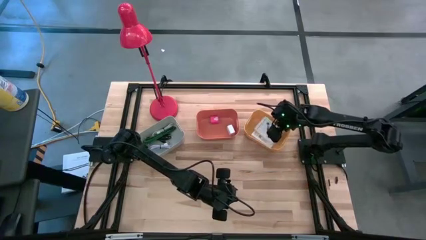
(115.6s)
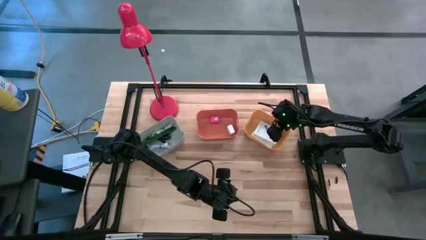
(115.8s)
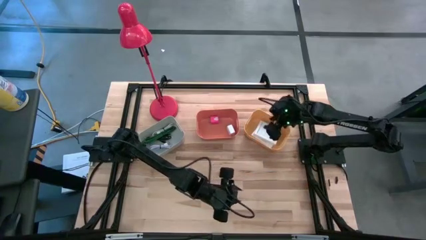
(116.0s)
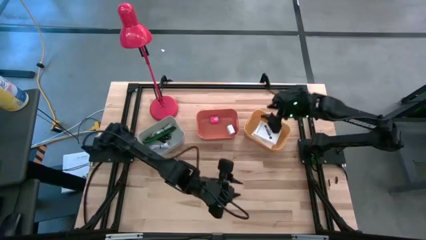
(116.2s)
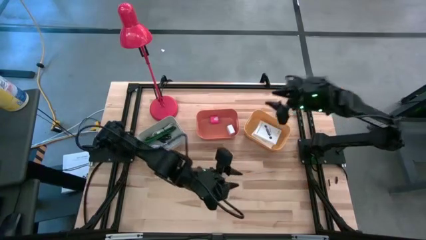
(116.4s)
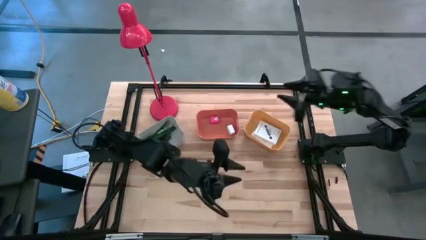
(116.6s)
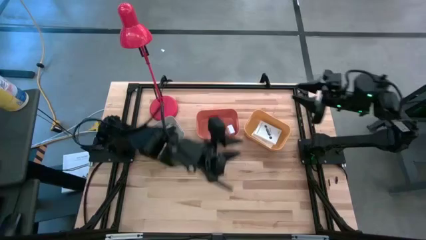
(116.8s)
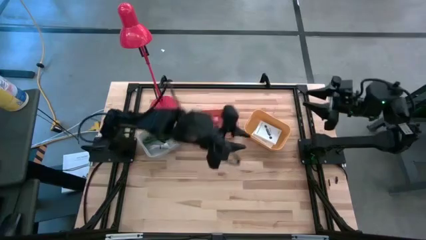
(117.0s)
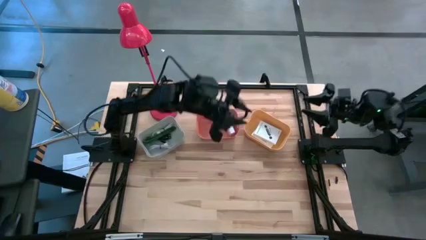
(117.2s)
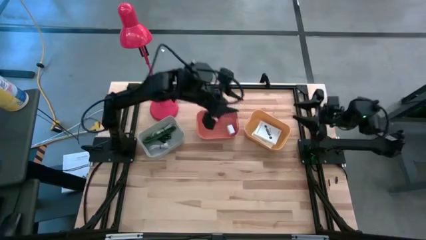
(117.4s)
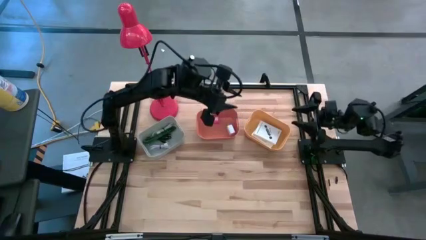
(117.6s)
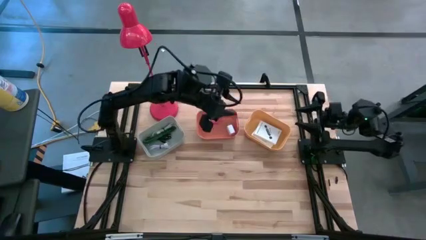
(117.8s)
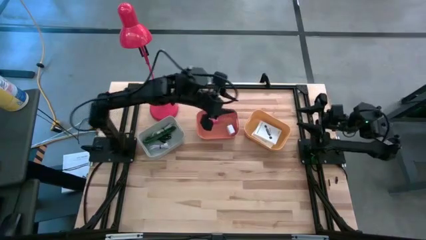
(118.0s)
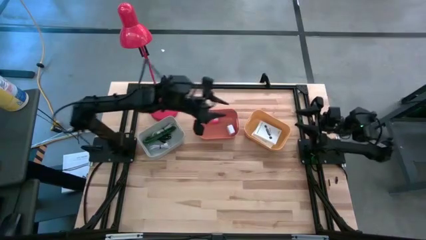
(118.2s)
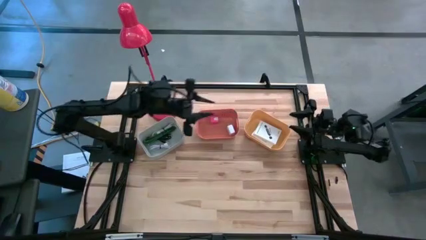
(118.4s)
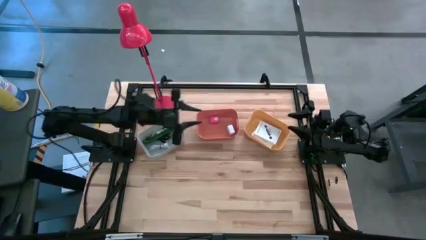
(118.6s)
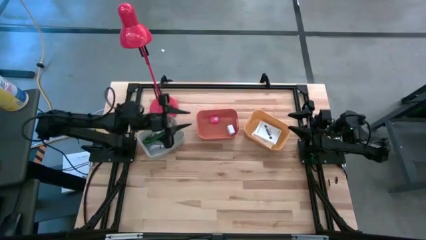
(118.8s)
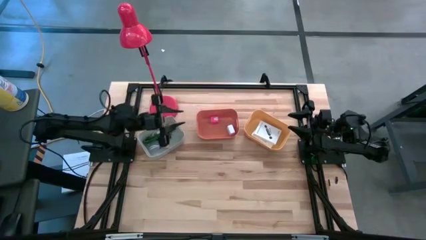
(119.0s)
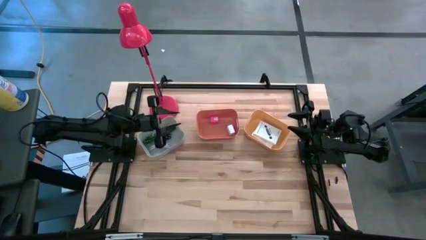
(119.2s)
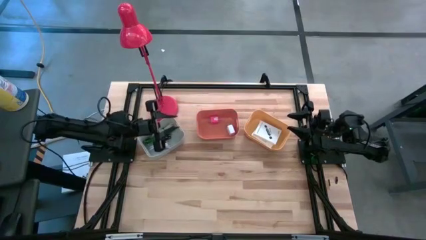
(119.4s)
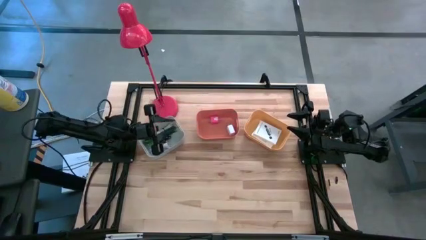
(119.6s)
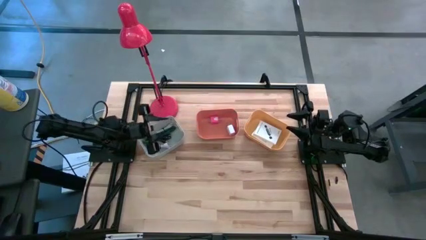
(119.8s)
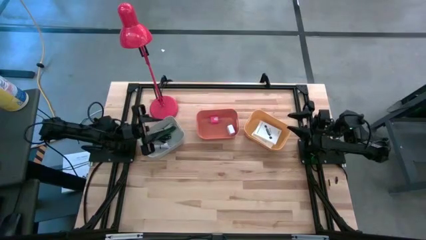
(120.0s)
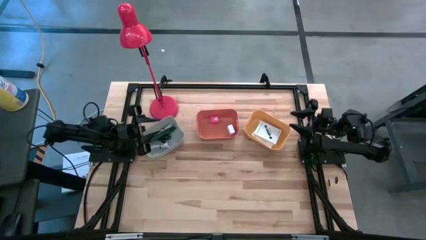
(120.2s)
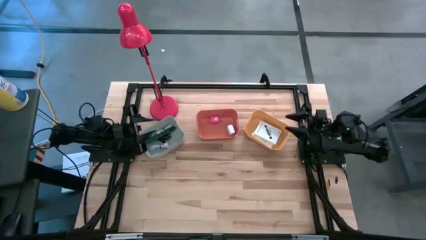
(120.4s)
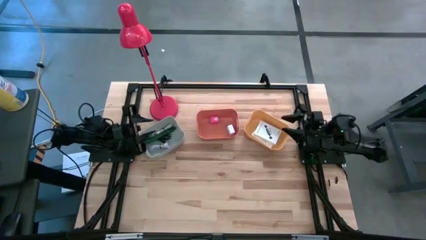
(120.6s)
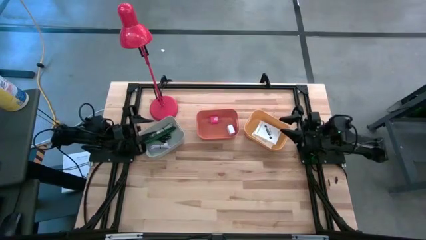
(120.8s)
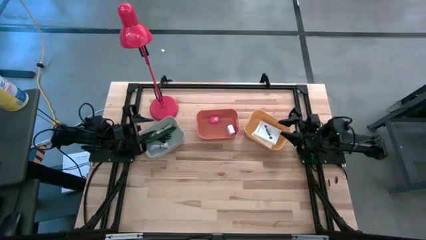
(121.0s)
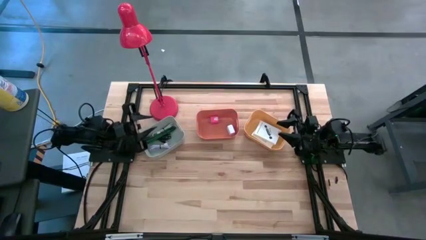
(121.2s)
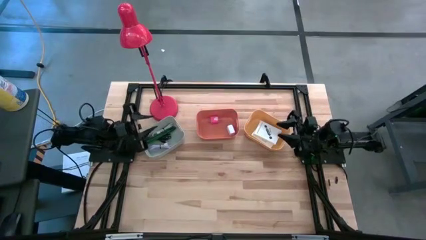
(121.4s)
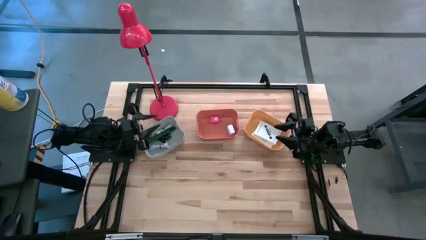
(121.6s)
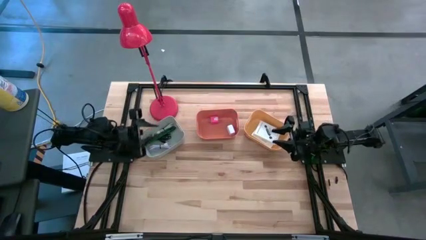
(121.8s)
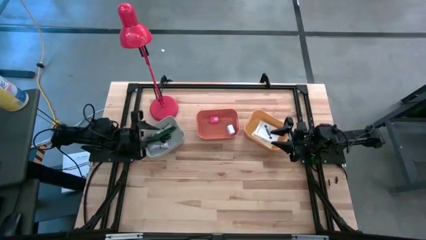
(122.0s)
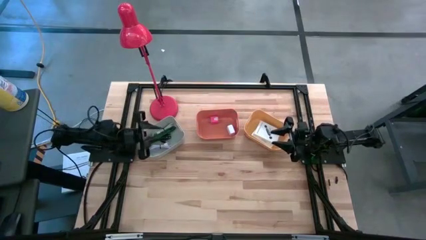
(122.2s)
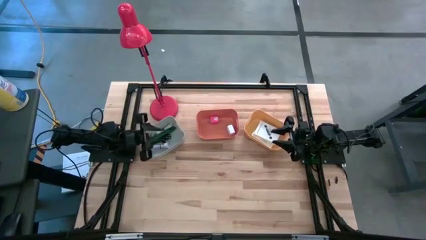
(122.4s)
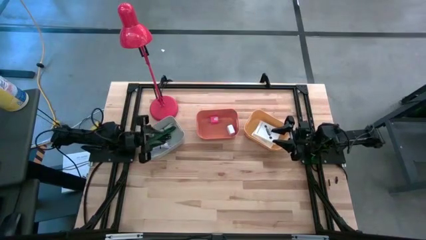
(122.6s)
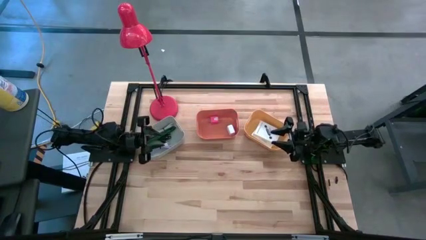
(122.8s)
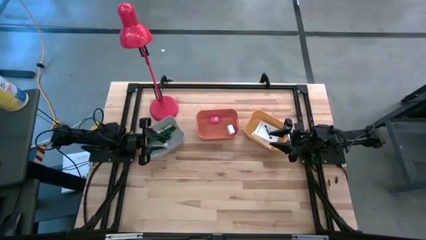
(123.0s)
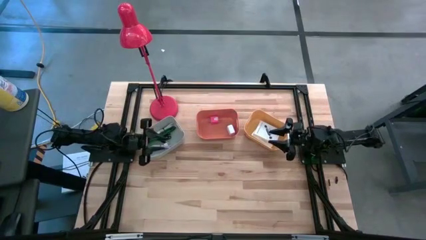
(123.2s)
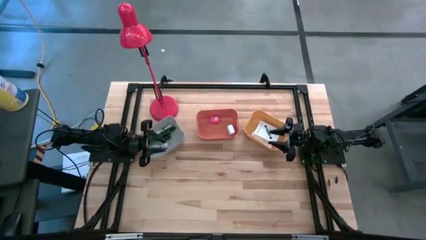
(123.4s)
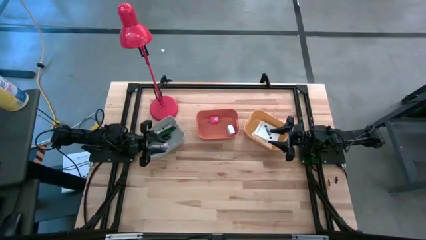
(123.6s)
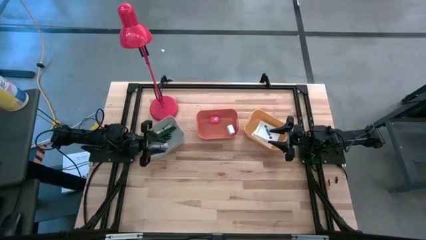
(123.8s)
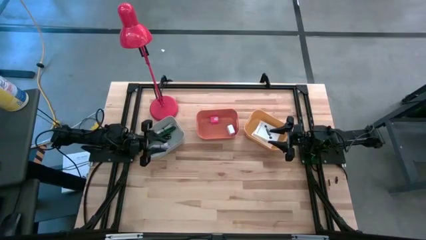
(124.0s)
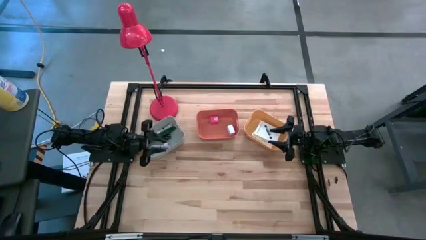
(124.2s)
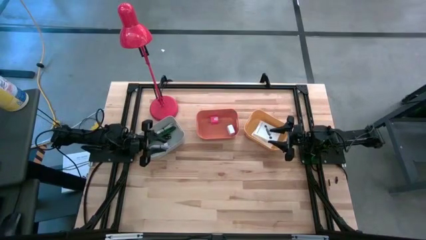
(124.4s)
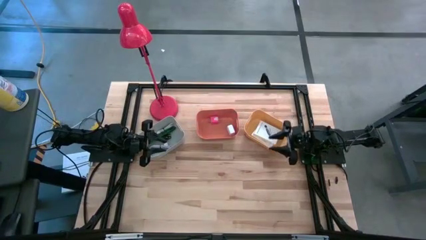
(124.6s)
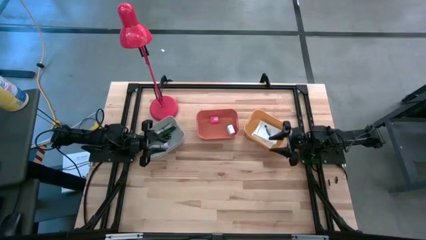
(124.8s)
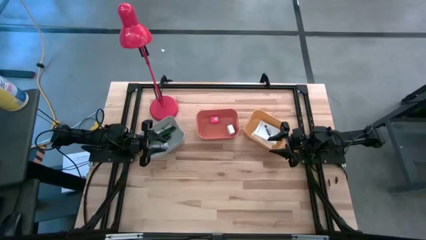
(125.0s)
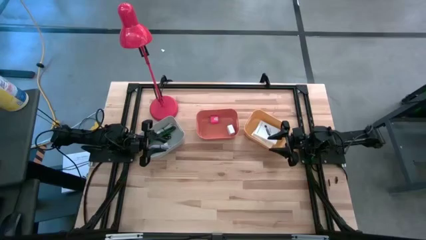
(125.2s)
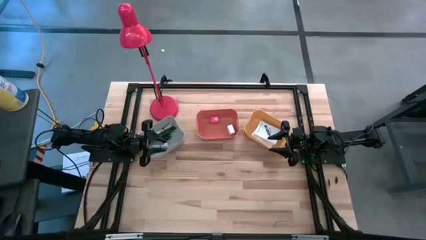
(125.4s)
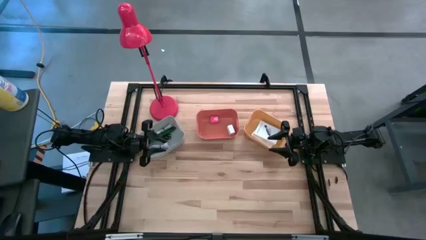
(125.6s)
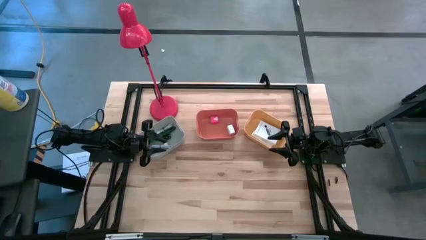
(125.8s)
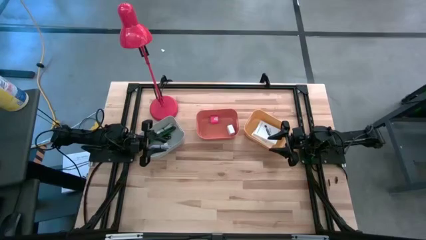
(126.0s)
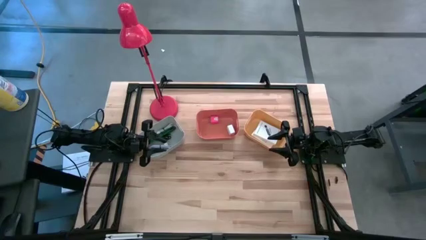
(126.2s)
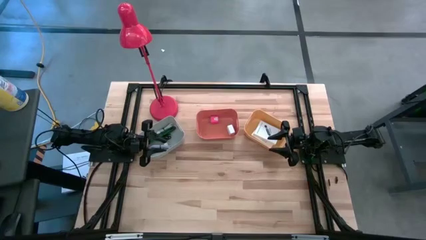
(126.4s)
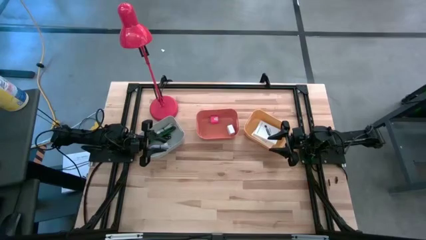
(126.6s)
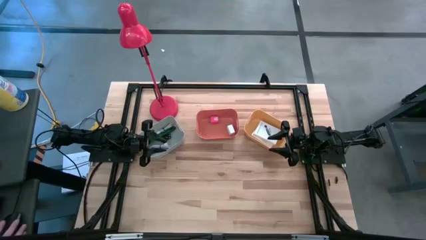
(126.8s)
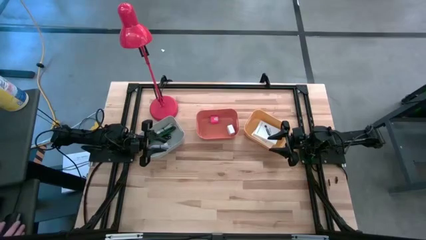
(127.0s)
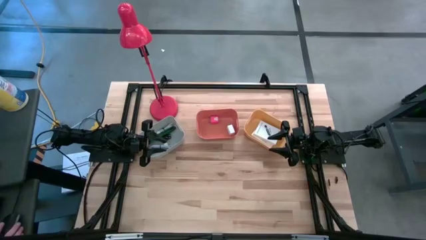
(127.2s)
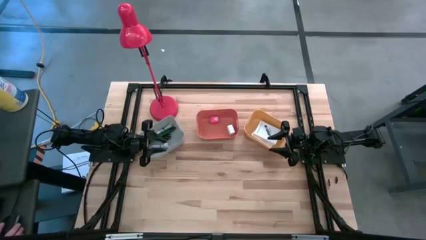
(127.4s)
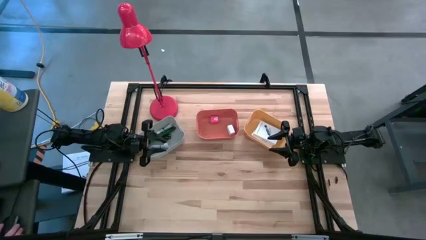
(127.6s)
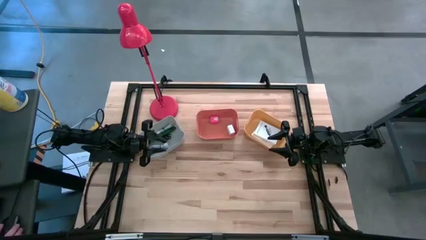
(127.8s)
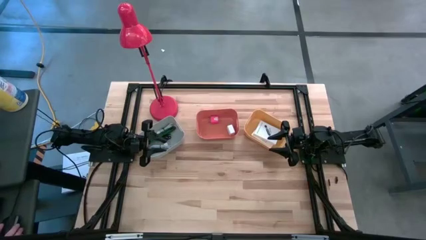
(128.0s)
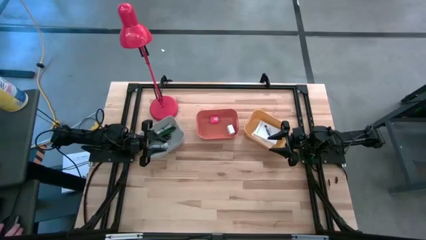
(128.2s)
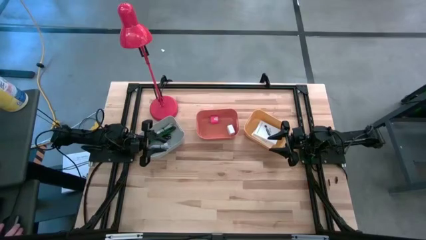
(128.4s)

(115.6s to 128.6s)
Task: Pick and place items into bin
Return to Home Position

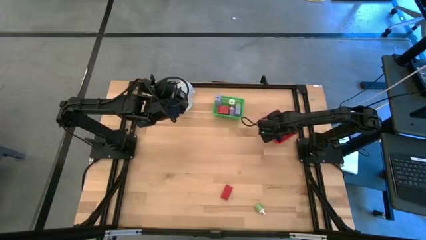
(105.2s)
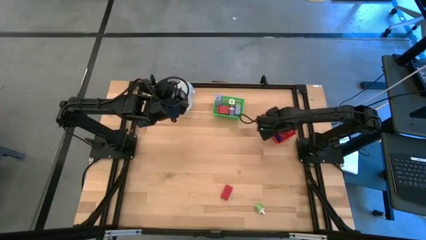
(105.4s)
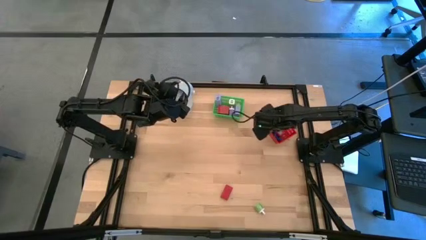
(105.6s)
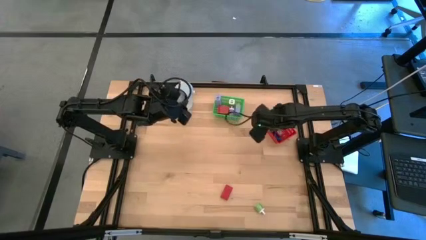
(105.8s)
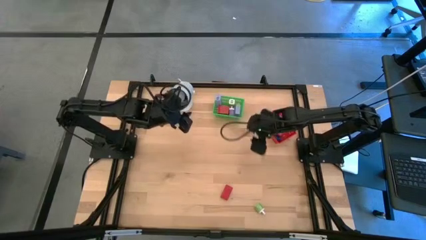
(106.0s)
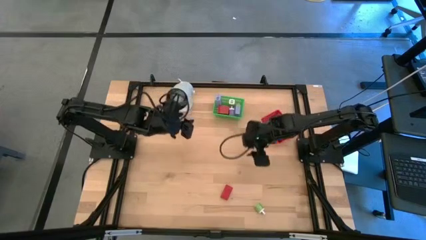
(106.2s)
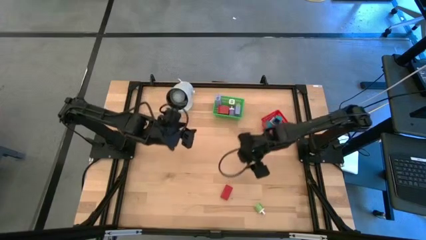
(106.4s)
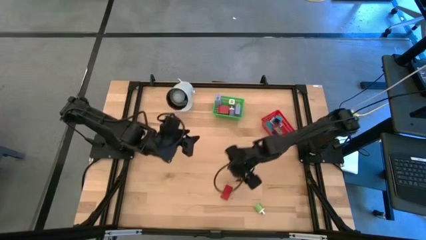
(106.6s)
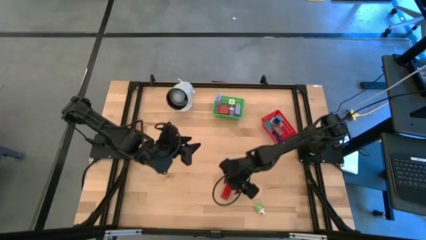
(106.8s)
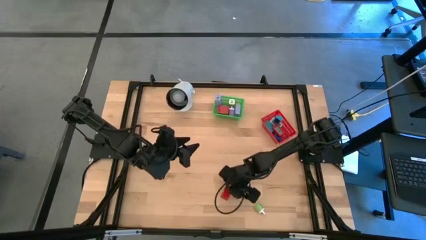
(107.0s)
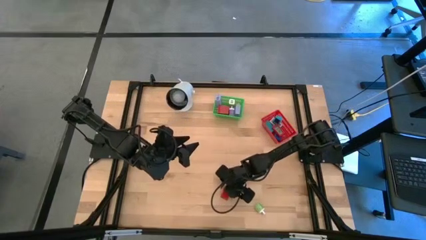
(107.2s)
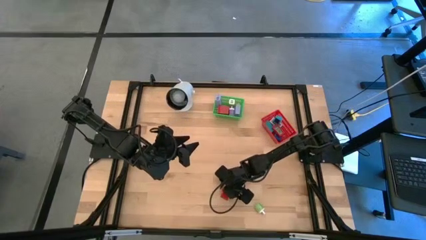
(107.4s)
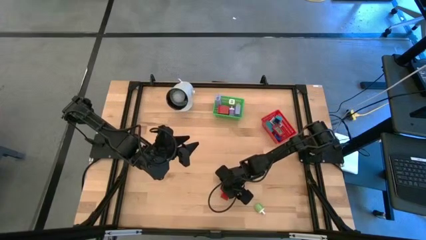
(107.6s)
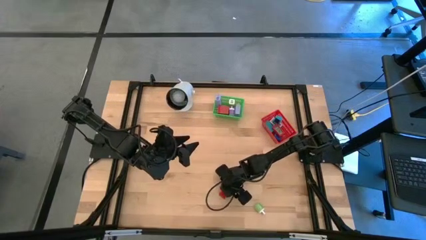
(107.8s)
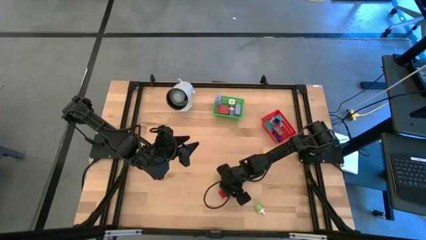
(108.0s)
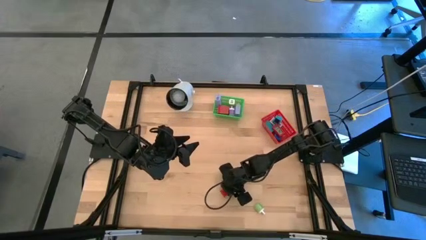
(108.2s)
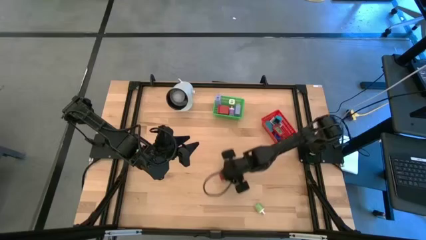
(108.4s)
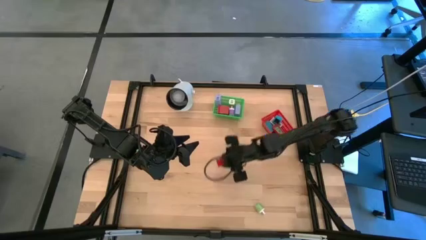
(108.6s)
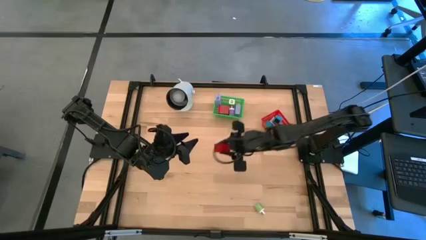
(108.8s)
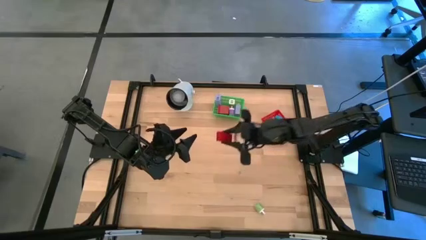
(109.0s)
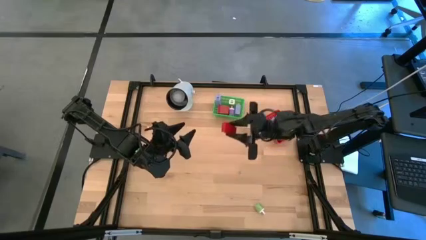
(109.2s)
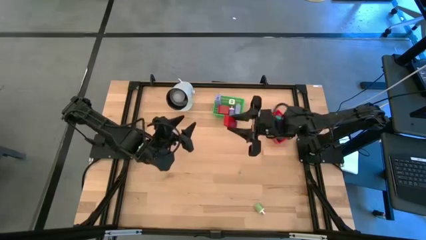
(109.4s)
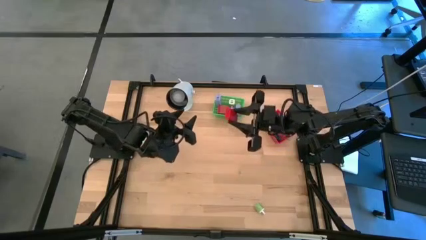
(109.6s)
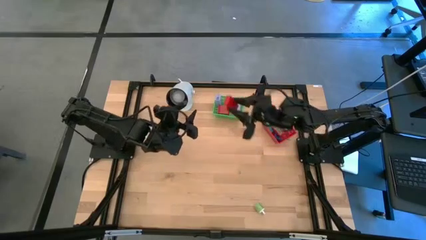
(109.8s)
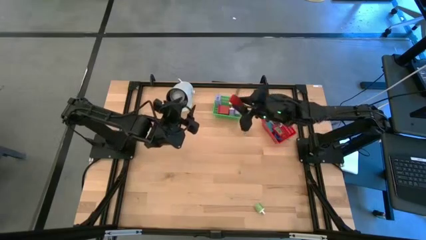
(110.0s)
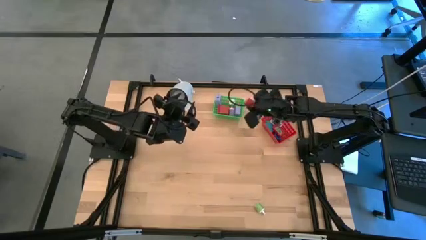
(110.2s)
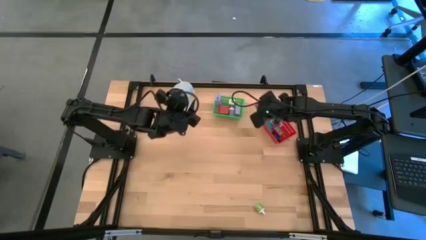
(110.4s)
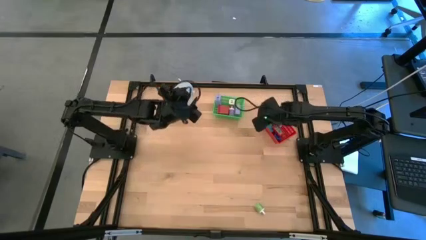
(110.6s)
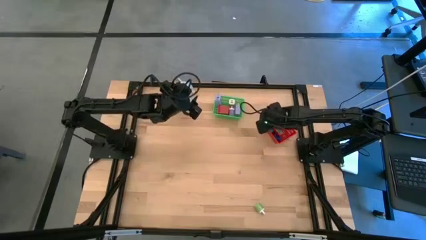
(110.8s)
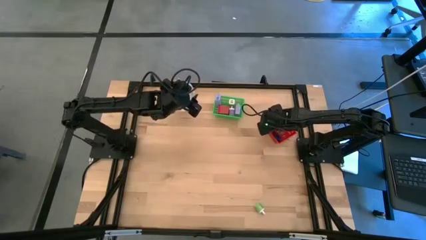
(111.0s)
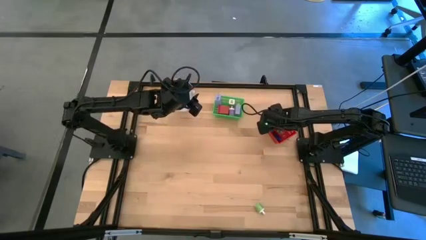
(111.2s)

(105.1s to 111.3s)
Task: Pick & Place Office items
Put the red digital timer into the red bin
